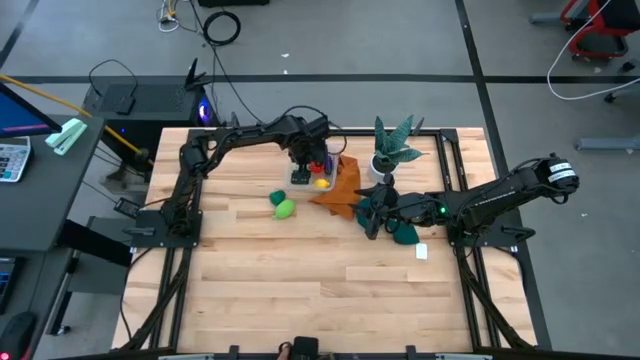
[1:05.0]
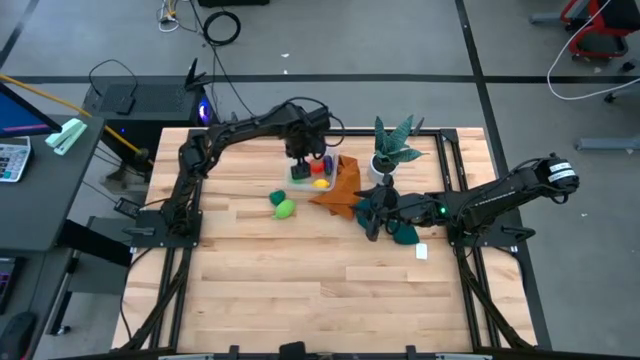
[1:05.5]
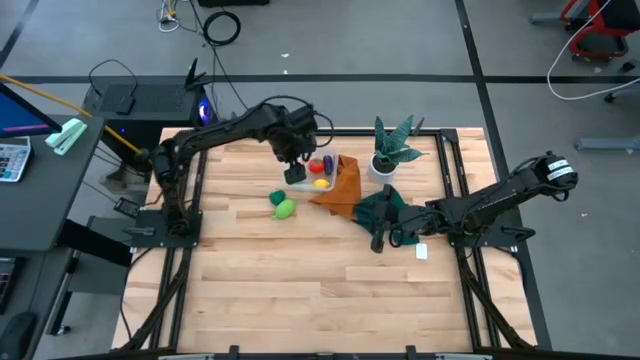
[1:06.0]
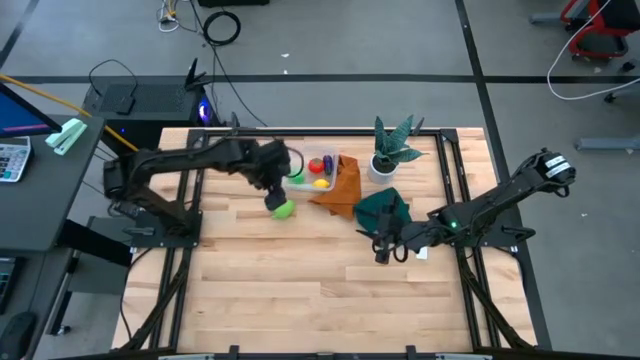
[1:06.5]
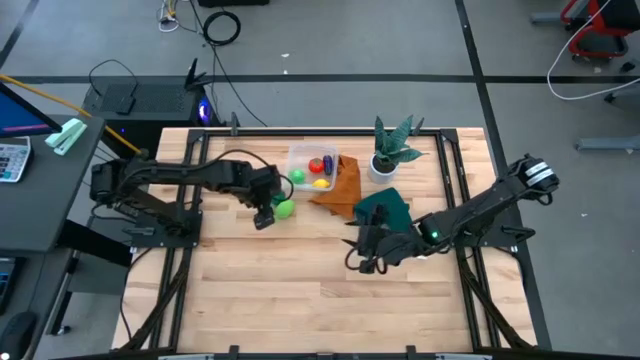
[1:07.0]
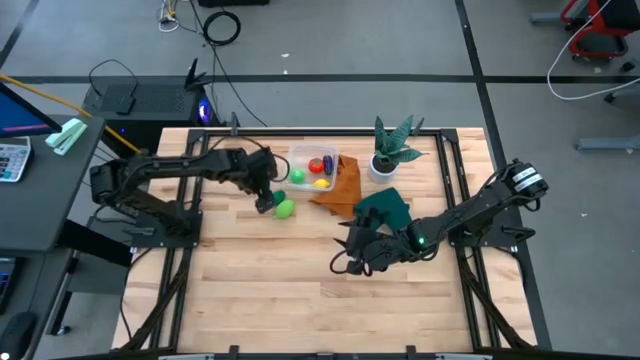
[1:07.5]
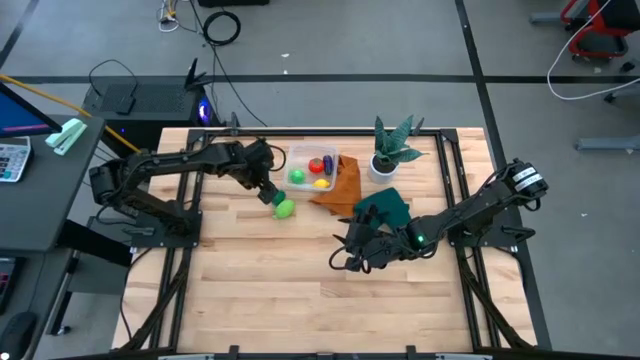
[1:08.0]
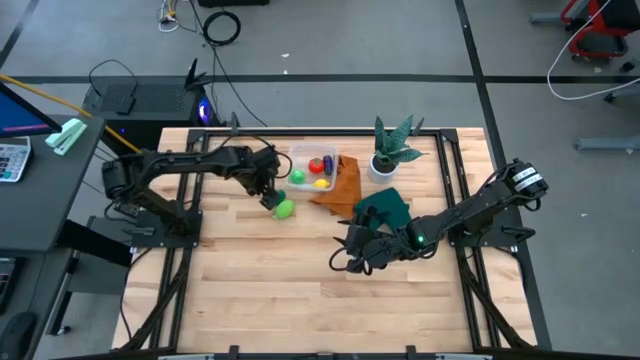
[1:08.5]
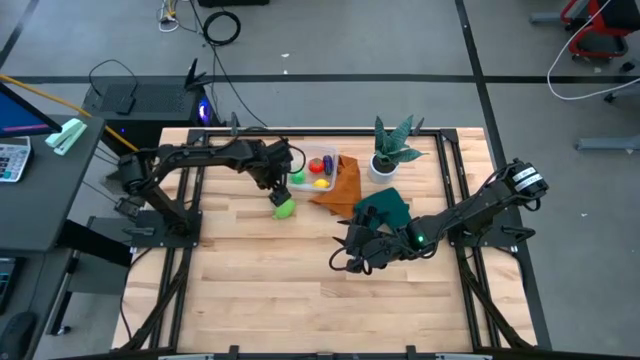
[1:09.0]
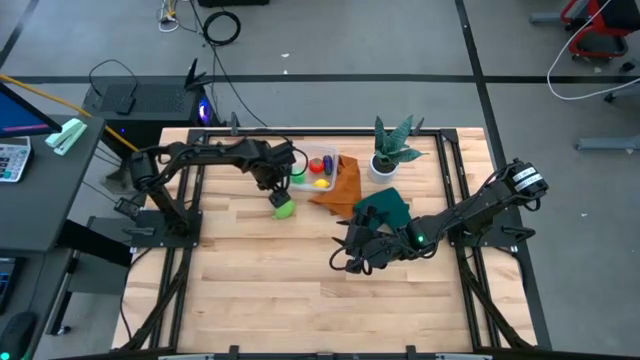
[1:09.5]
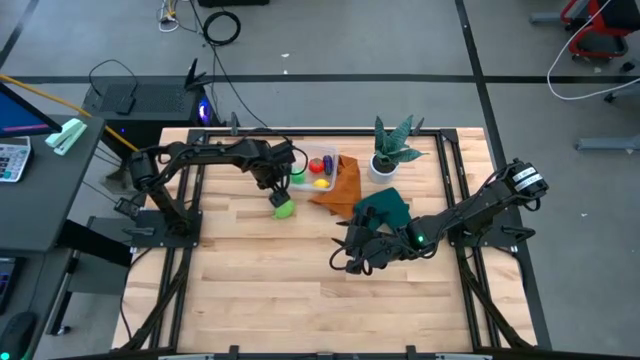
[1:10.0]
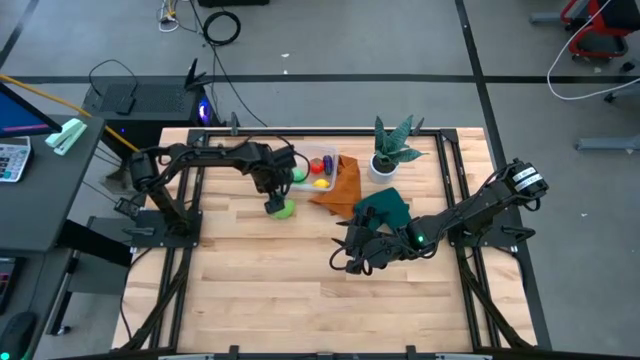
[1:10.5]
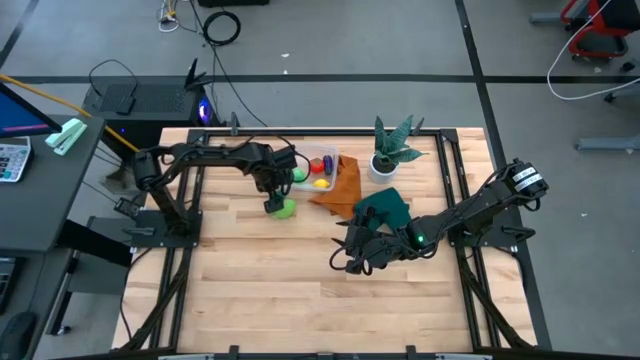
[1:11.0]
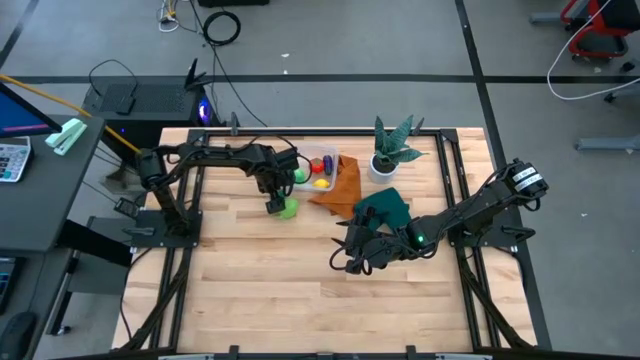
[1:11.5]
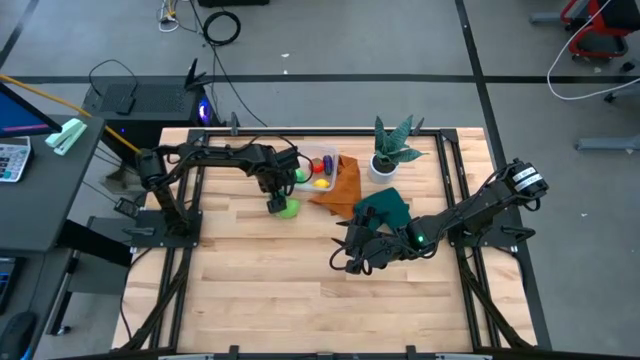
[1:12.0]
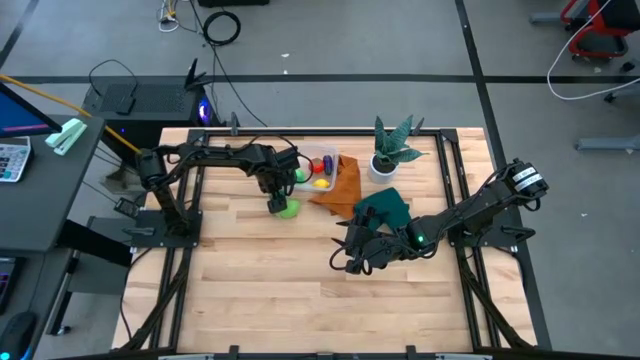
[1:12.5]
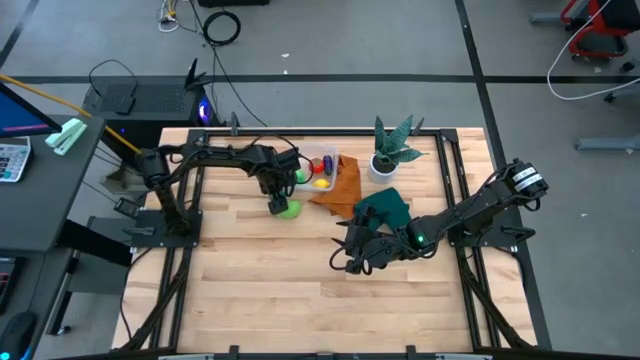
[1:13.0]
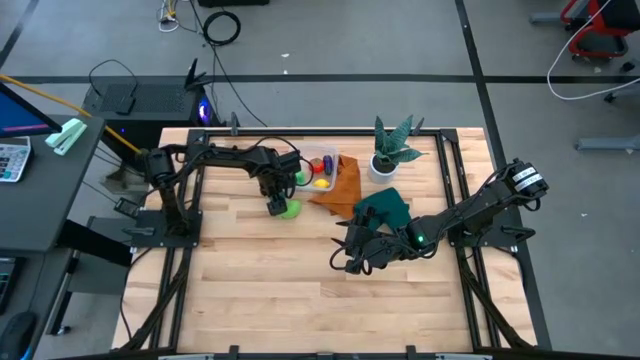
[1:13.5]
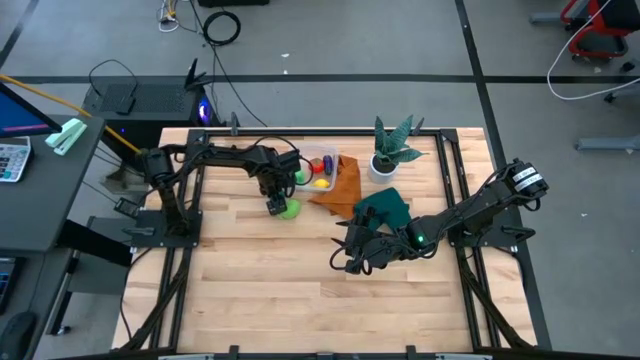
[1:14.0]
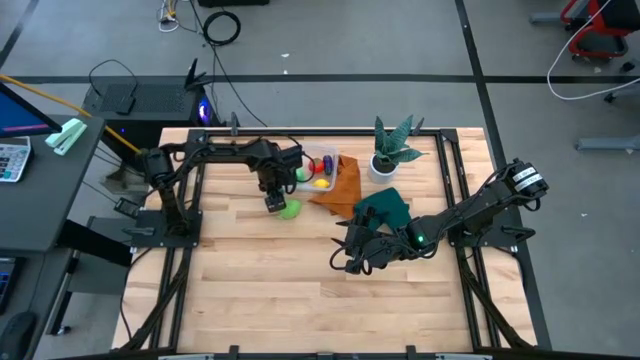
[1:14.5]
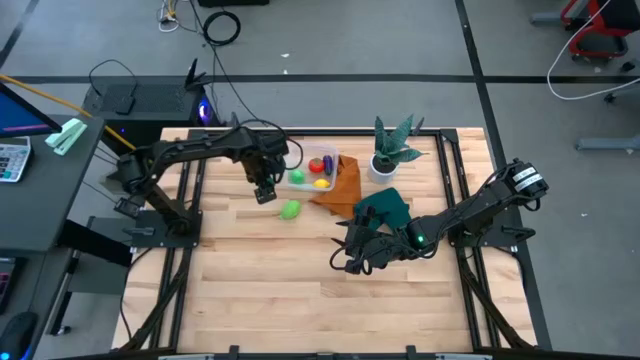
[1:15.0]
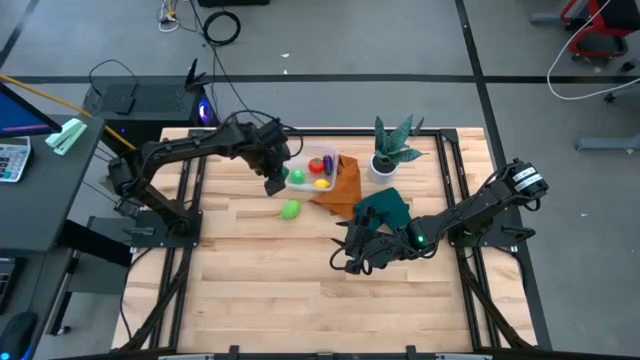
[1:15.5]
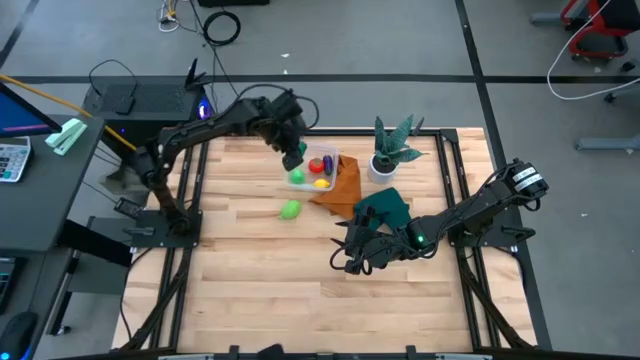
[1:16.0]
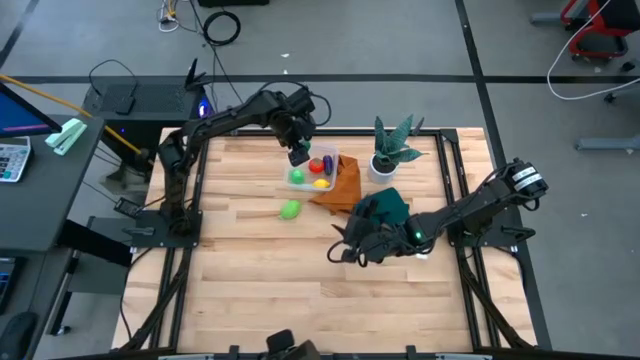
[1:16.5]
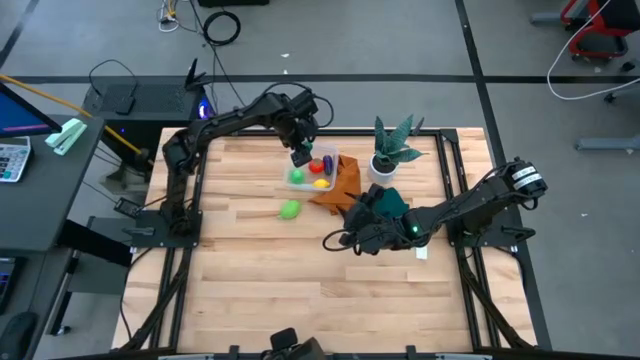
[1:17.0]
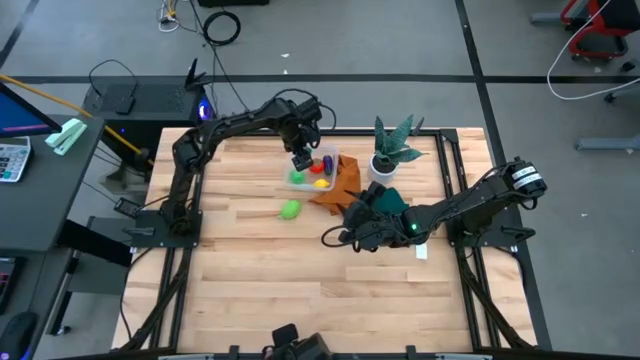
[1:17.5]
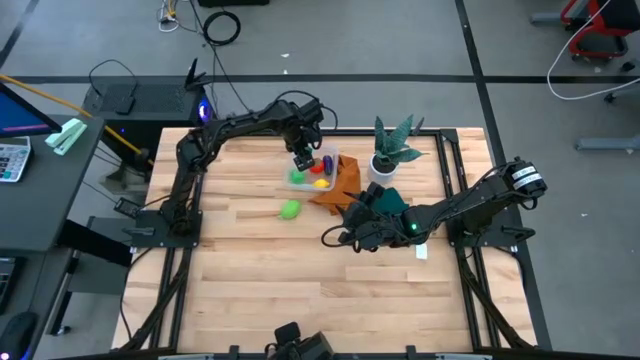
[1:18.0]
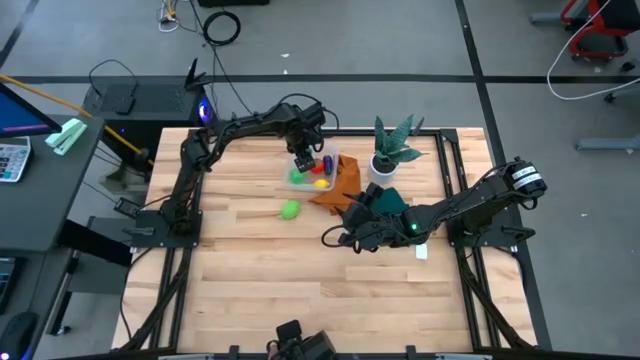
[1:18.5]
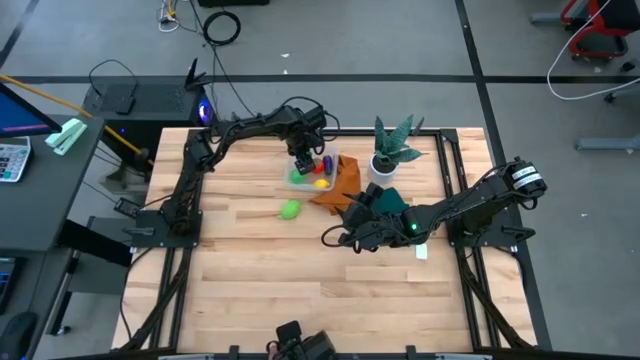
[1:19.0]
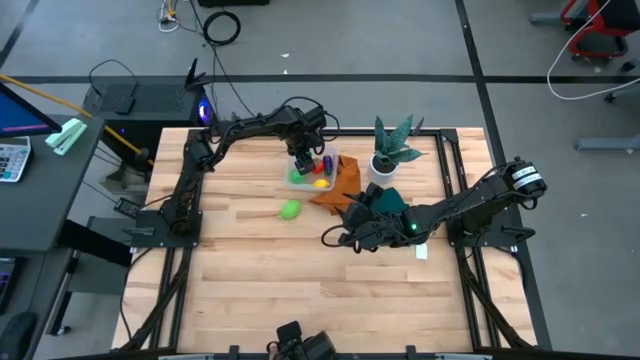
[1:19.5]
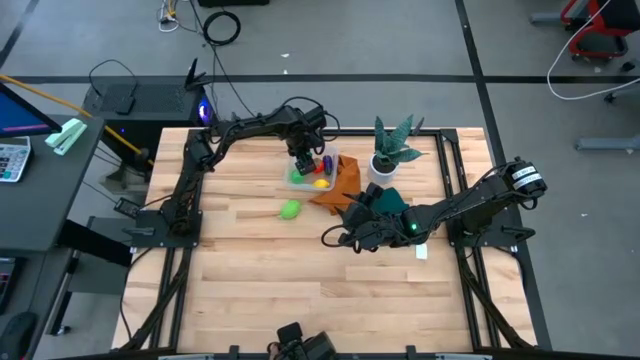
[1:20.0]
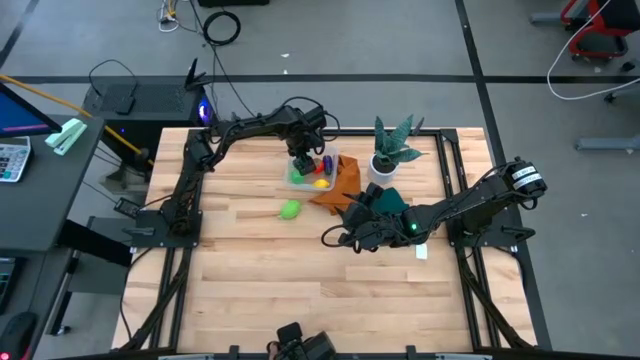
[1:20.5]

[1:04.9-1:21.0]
Task: Pick and placing Produce into tupperware
Put the green bell pepper into the transparent container

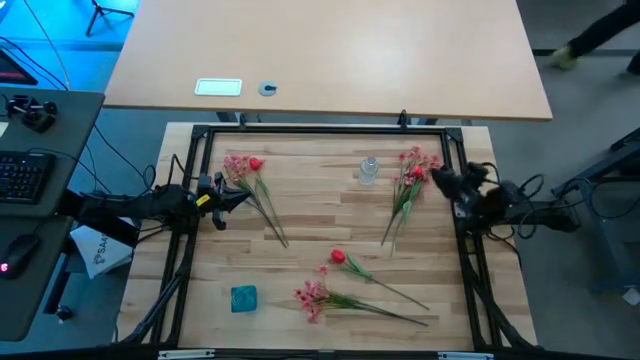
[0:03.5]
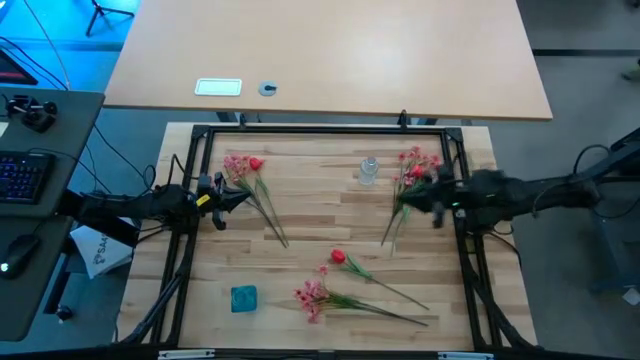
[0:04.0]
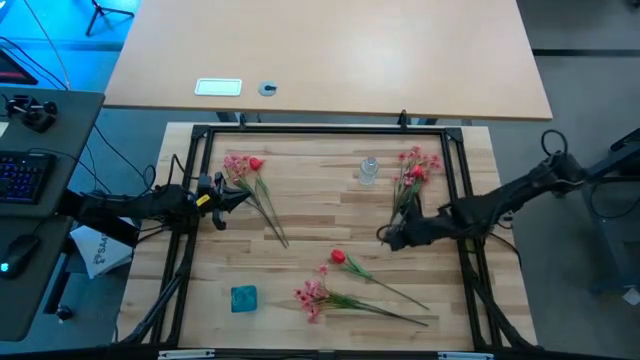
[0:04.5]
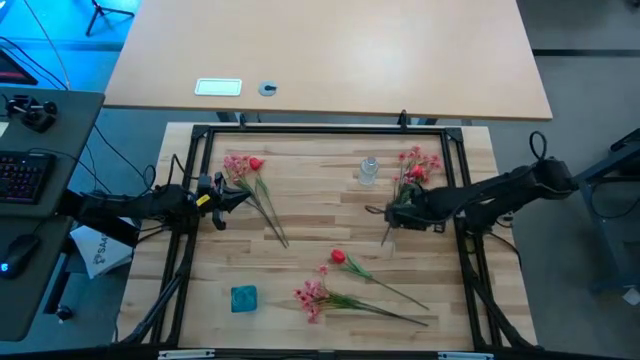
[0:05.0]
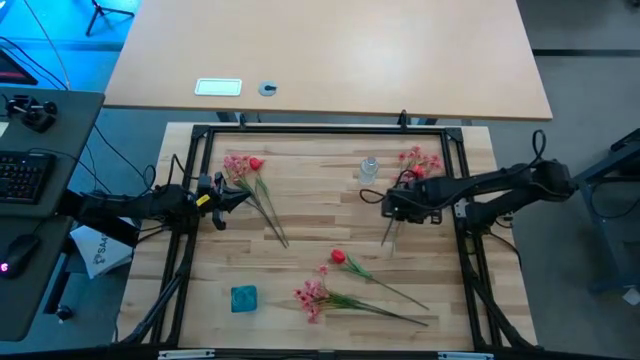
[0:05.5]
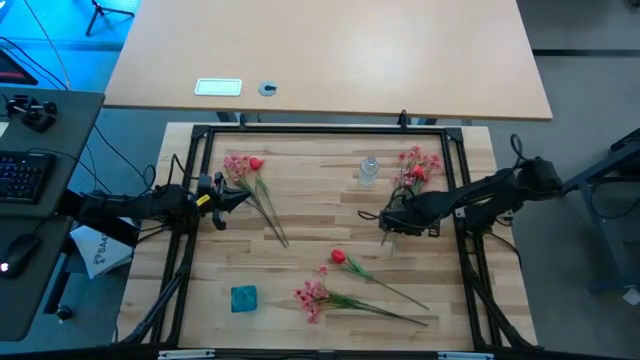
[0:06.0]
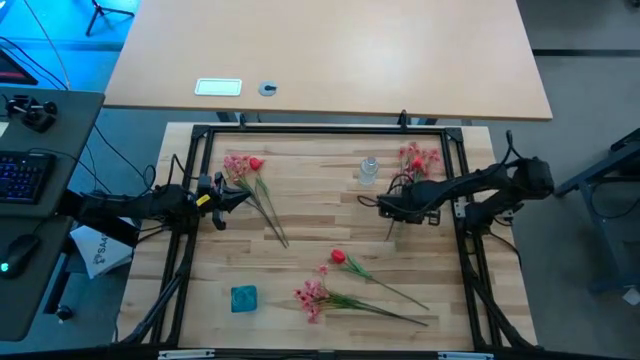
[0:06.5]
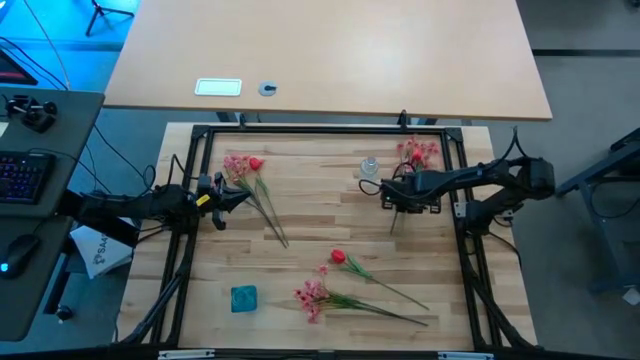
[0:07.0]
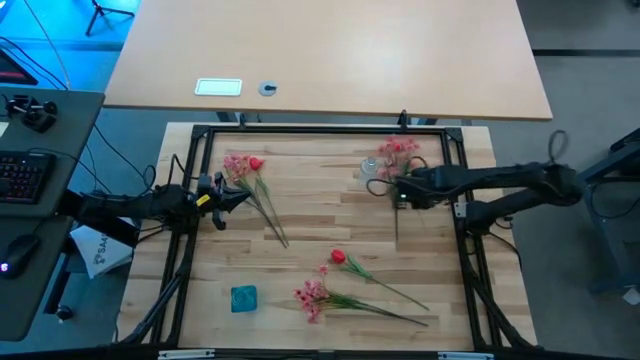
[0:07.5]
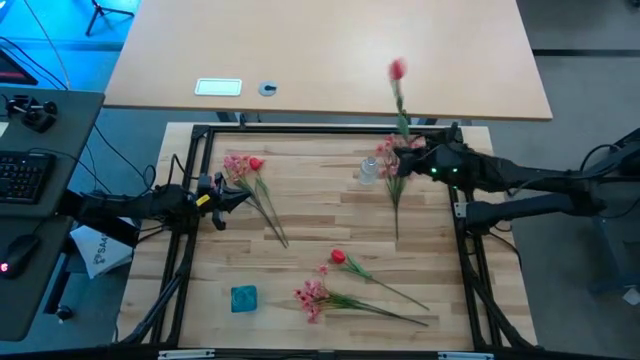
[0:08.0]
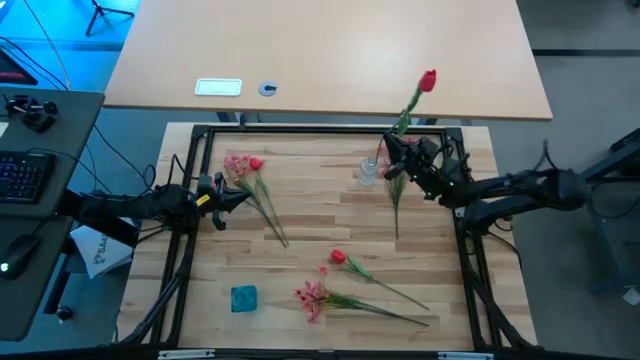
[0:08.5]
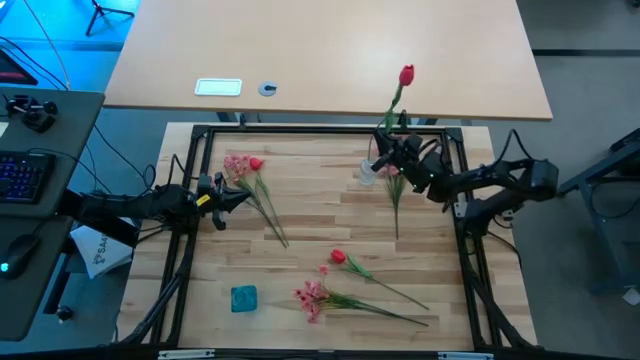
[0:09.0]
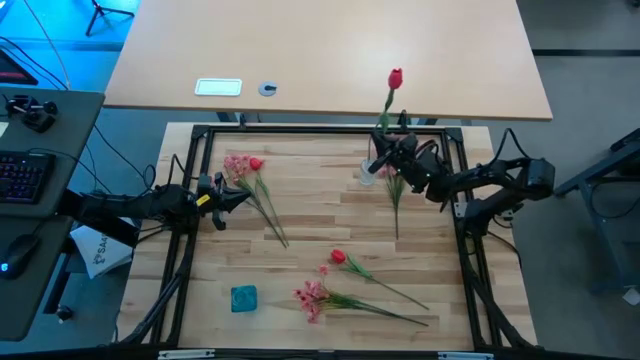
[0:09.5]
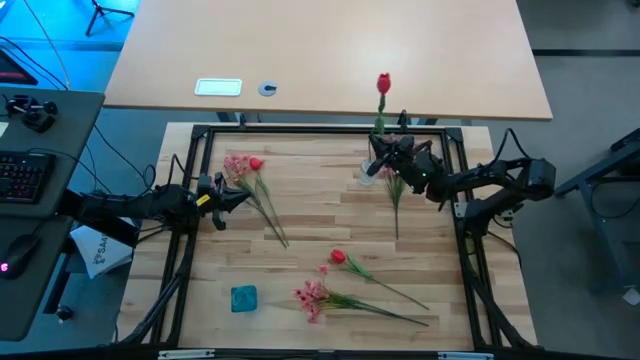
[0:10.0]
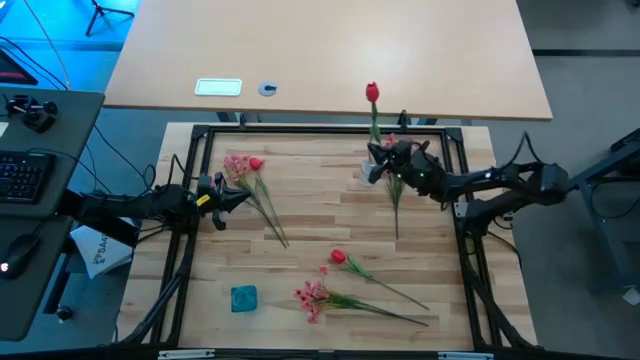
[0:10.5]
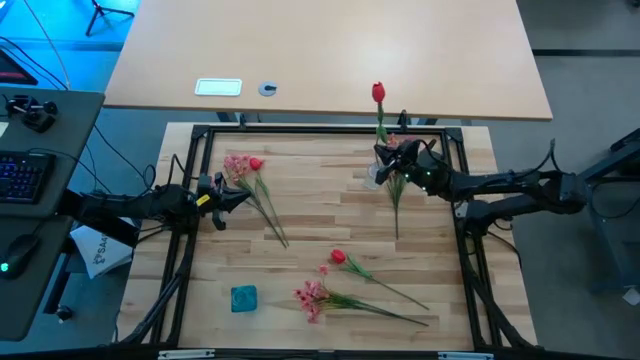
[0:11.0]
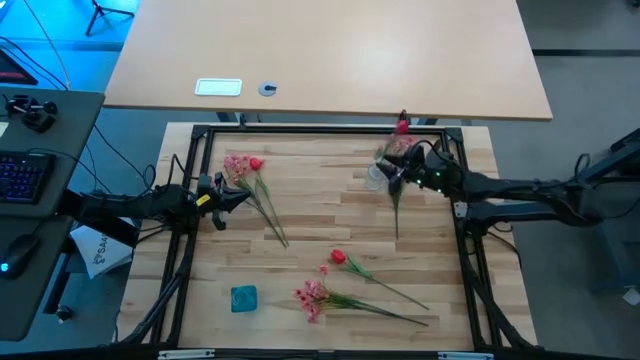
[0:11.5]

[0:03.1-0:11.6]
Task: Sort flowers into vase by color
Put the top right red flower into the clear vase
